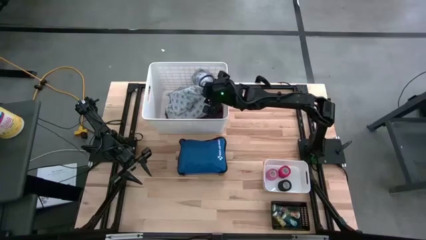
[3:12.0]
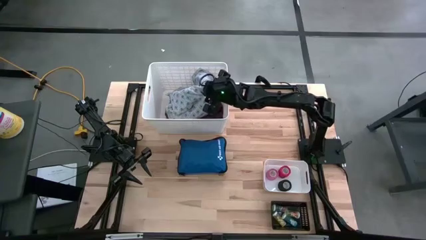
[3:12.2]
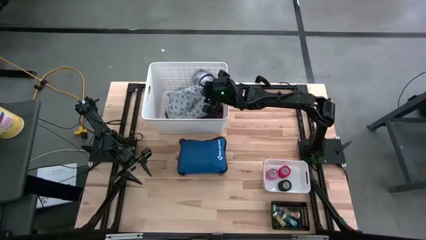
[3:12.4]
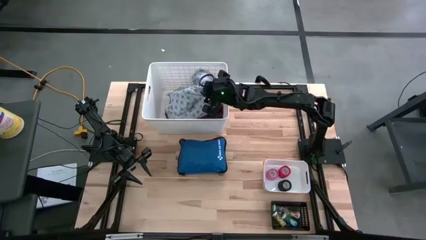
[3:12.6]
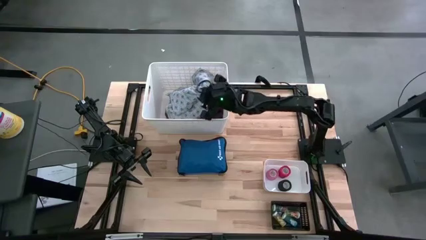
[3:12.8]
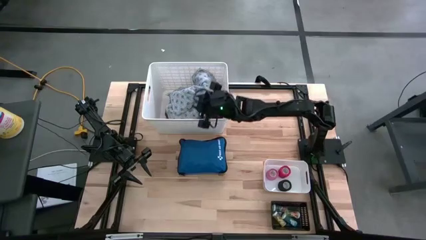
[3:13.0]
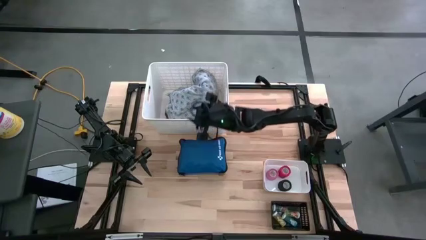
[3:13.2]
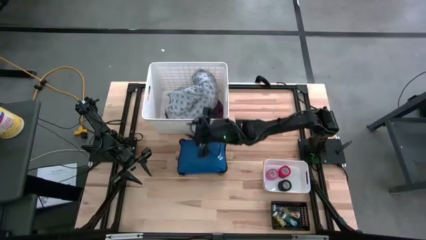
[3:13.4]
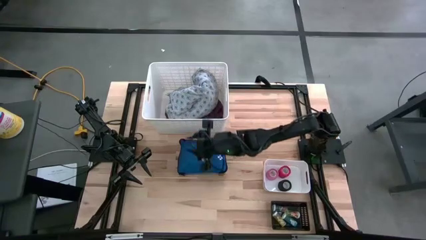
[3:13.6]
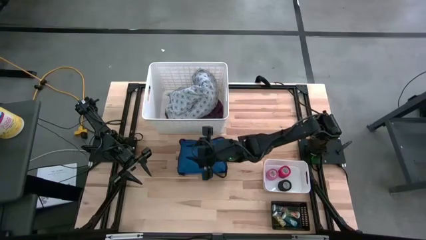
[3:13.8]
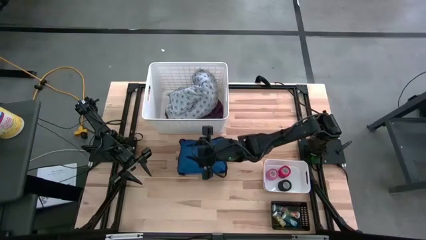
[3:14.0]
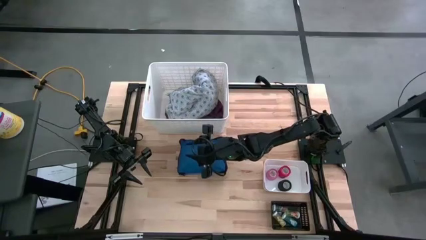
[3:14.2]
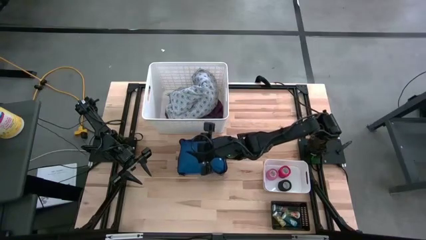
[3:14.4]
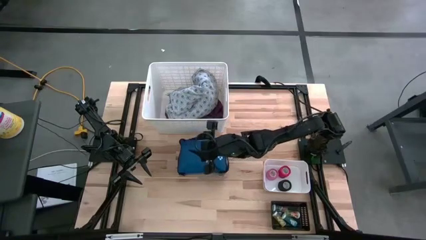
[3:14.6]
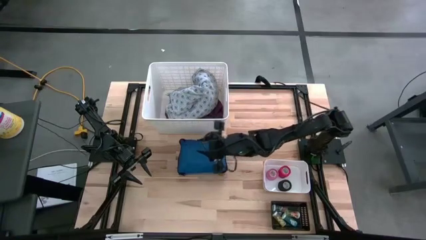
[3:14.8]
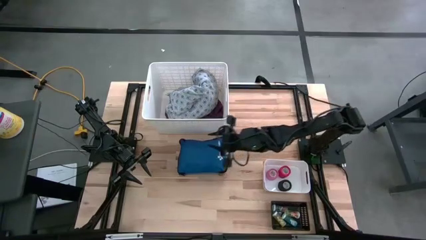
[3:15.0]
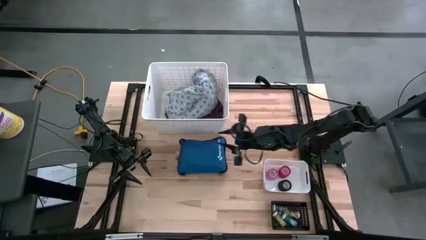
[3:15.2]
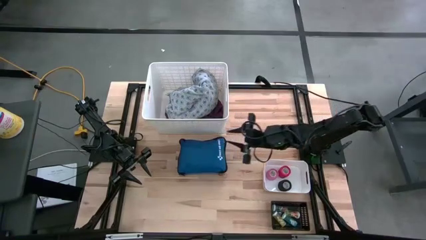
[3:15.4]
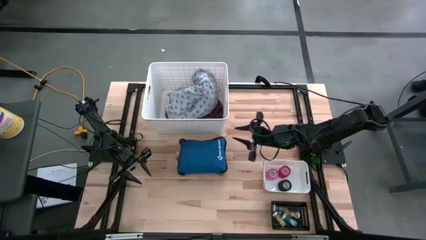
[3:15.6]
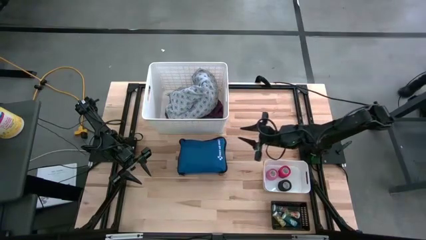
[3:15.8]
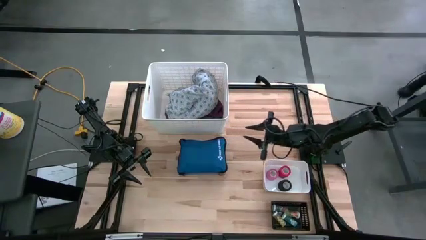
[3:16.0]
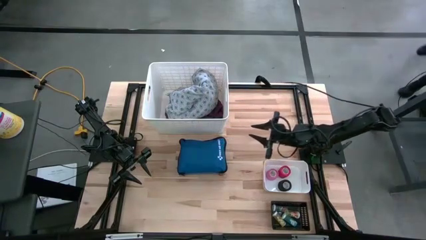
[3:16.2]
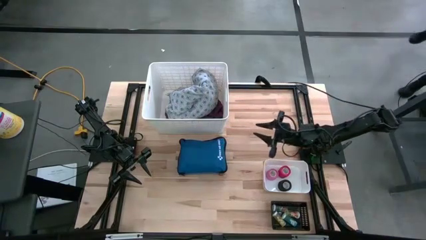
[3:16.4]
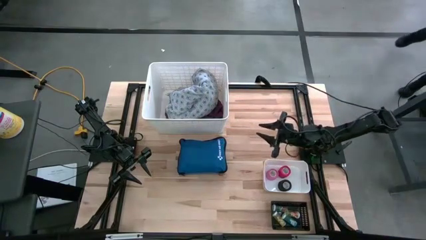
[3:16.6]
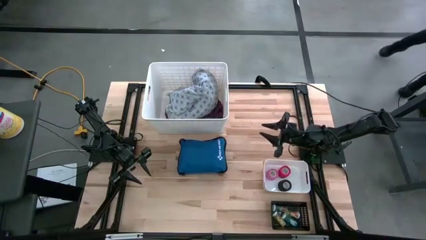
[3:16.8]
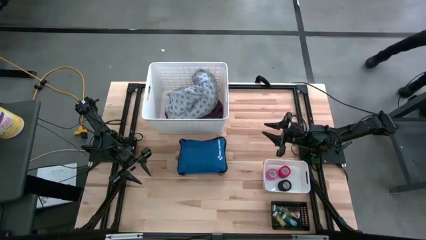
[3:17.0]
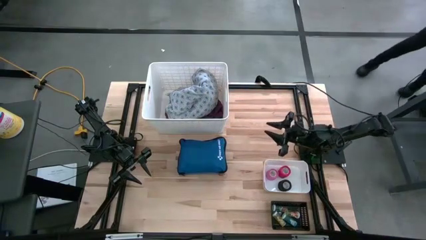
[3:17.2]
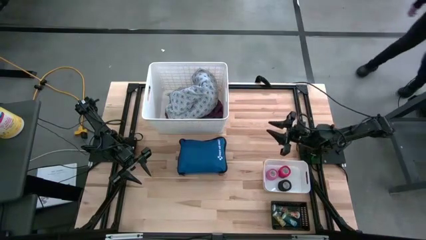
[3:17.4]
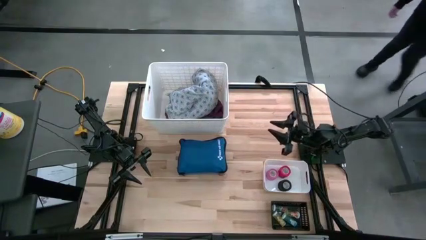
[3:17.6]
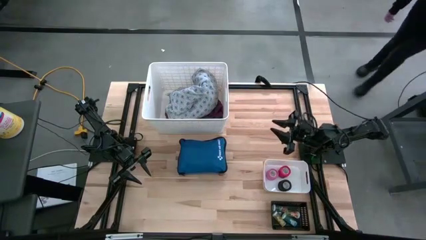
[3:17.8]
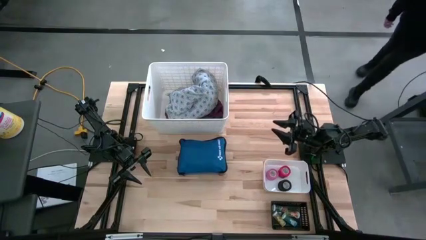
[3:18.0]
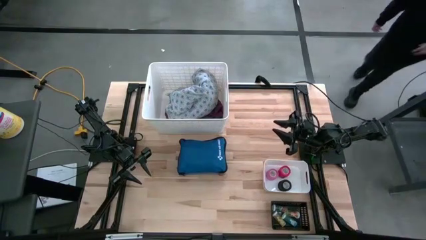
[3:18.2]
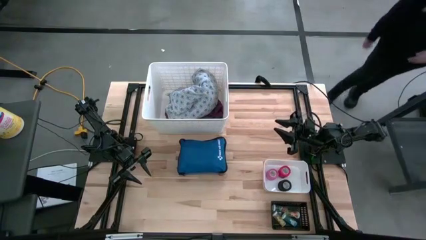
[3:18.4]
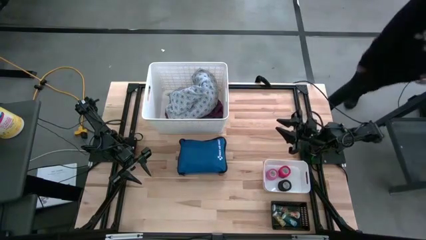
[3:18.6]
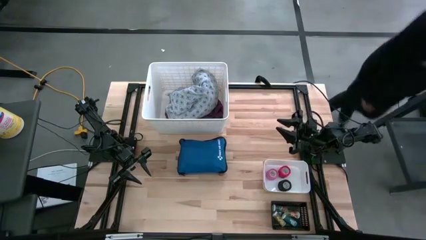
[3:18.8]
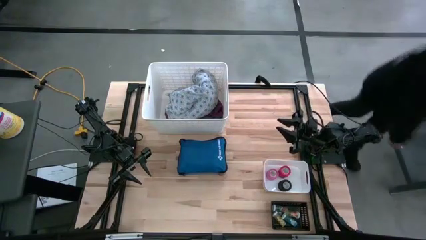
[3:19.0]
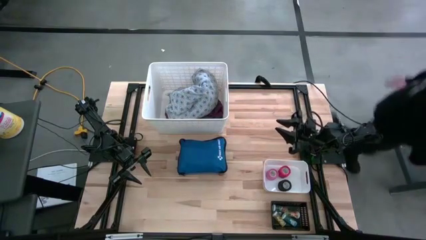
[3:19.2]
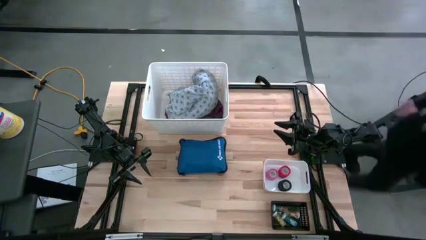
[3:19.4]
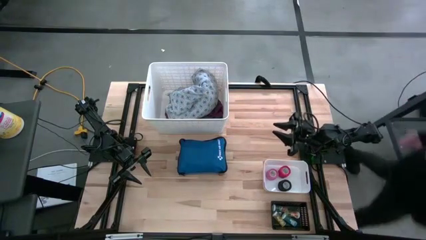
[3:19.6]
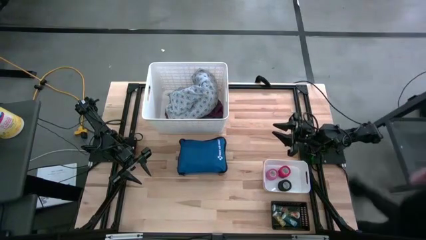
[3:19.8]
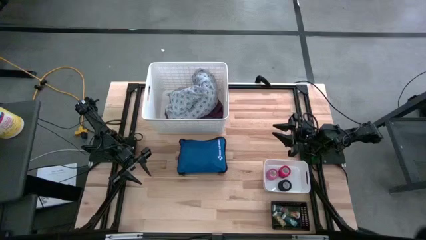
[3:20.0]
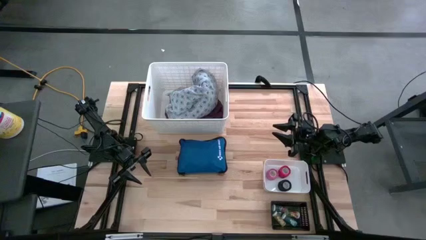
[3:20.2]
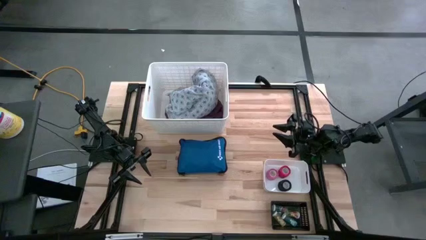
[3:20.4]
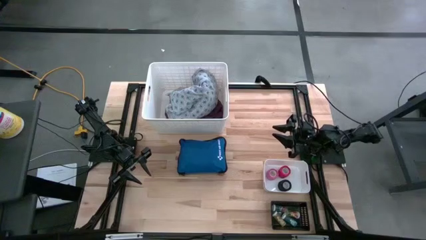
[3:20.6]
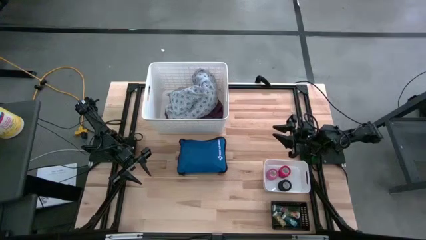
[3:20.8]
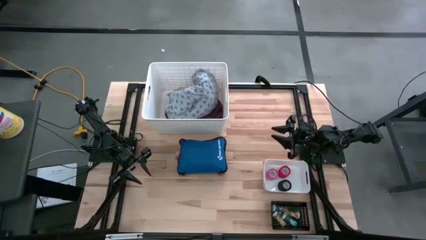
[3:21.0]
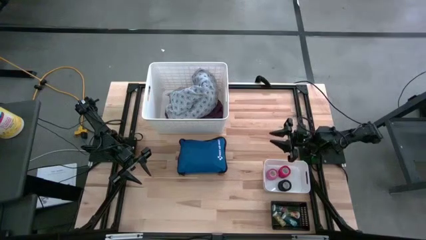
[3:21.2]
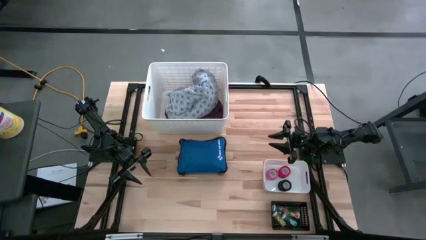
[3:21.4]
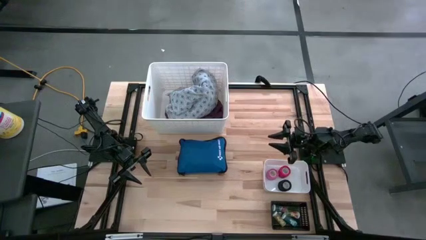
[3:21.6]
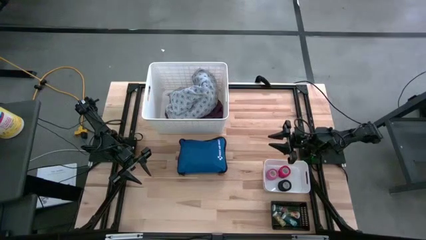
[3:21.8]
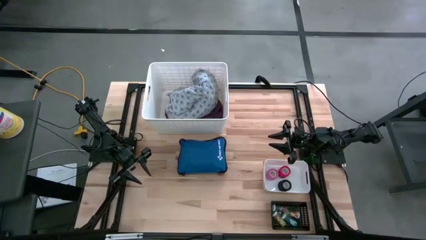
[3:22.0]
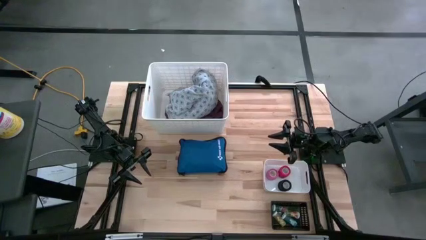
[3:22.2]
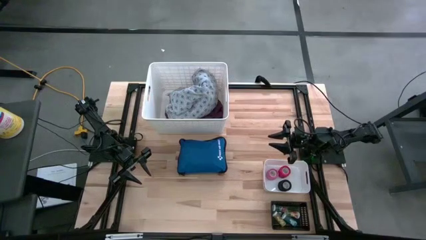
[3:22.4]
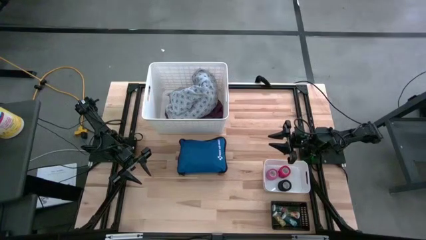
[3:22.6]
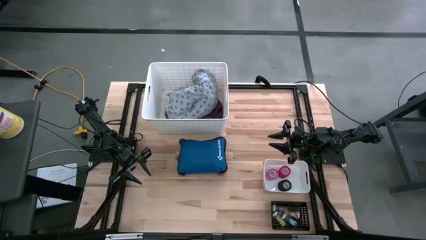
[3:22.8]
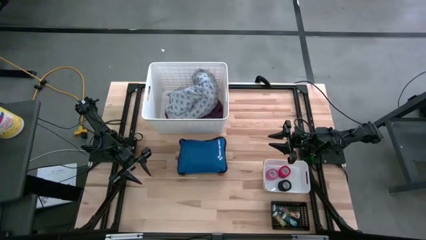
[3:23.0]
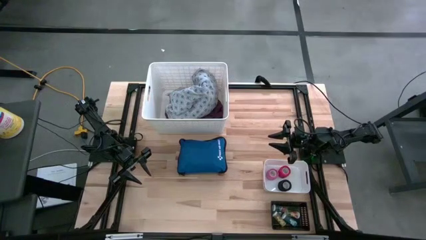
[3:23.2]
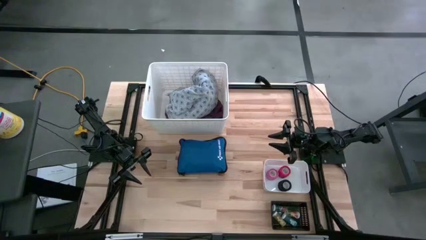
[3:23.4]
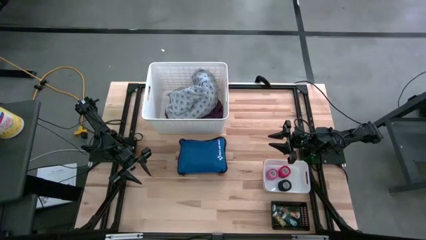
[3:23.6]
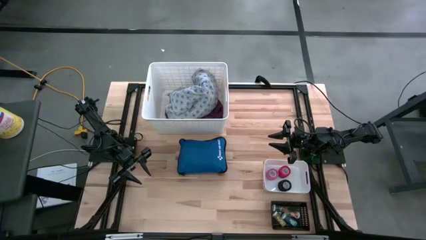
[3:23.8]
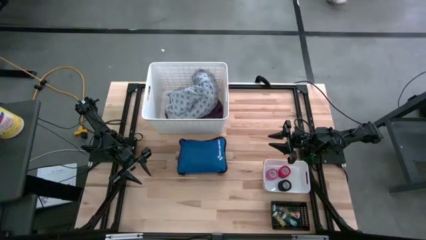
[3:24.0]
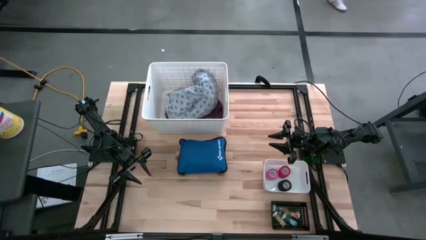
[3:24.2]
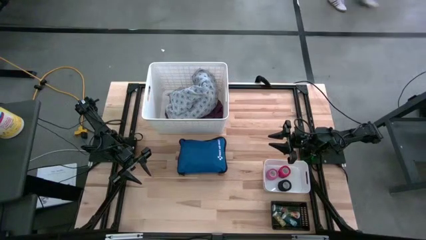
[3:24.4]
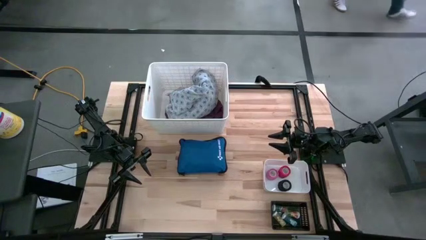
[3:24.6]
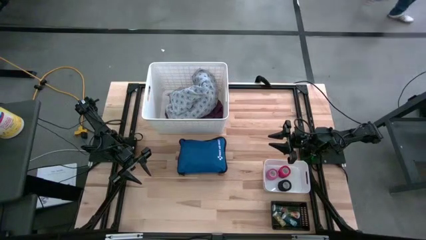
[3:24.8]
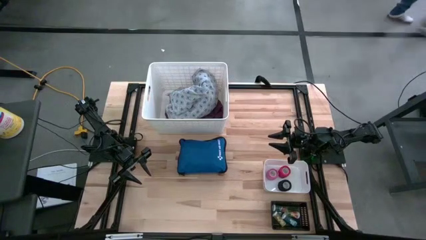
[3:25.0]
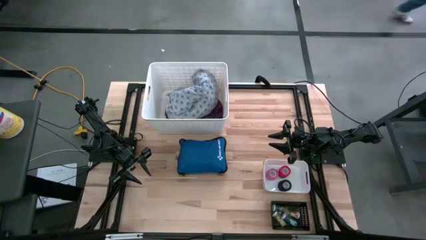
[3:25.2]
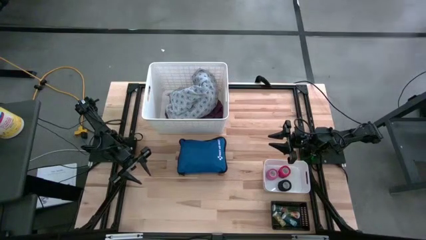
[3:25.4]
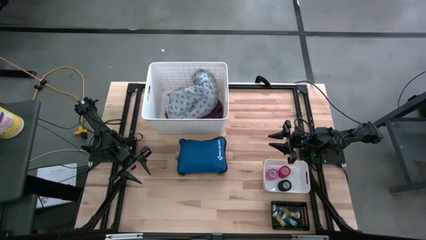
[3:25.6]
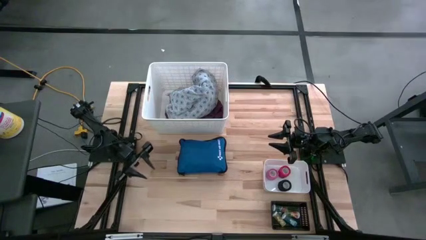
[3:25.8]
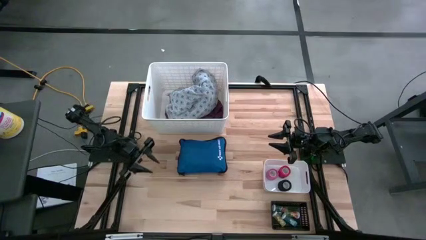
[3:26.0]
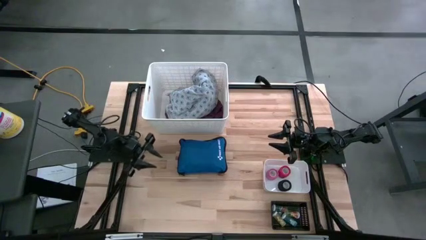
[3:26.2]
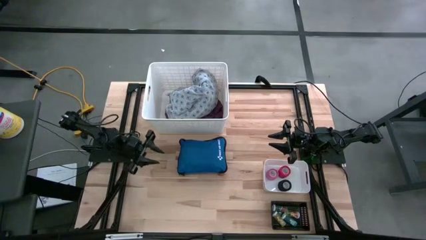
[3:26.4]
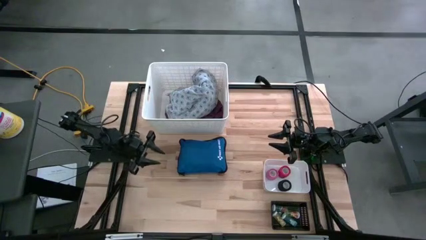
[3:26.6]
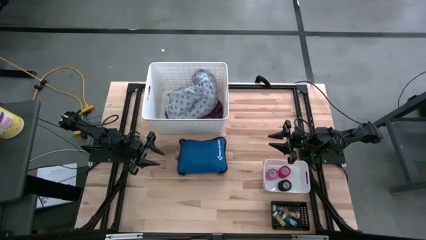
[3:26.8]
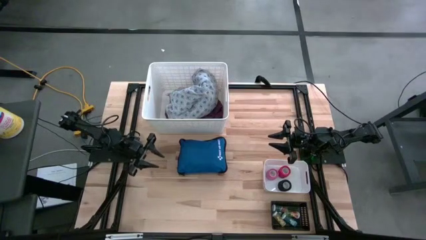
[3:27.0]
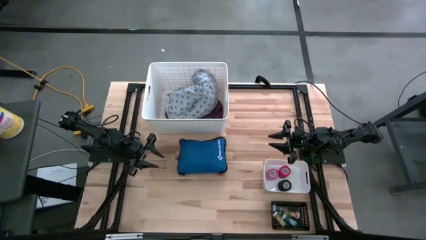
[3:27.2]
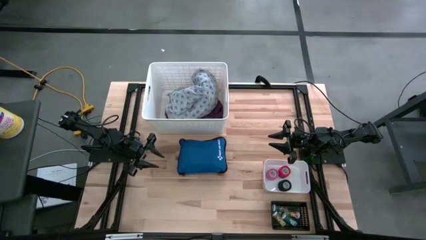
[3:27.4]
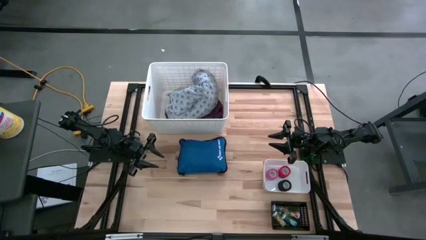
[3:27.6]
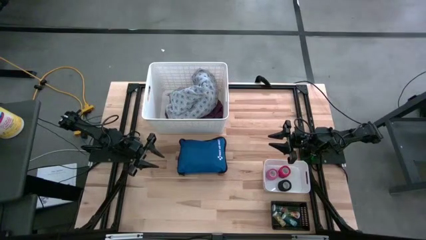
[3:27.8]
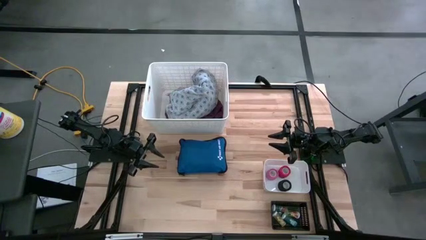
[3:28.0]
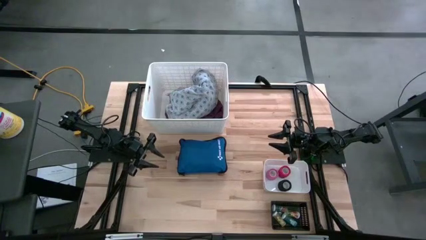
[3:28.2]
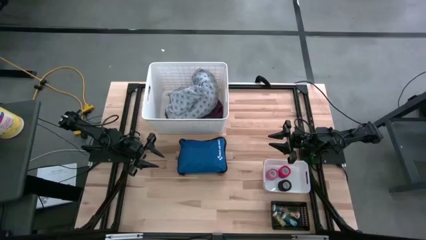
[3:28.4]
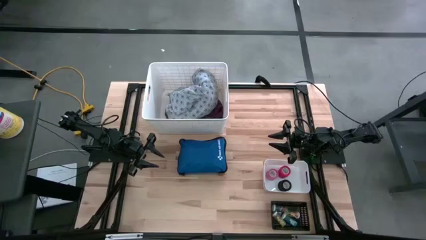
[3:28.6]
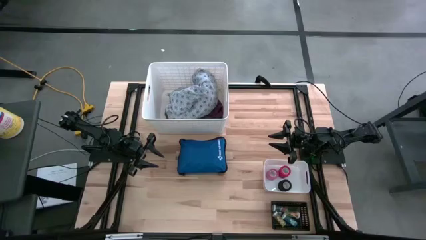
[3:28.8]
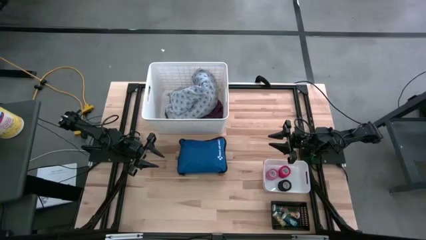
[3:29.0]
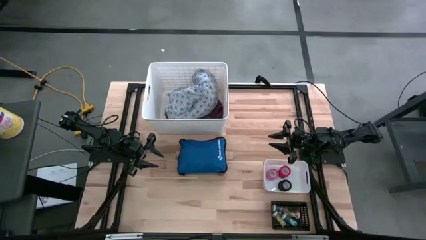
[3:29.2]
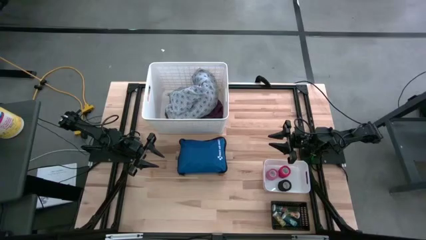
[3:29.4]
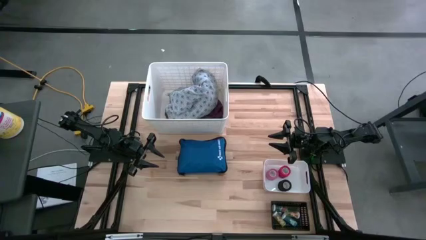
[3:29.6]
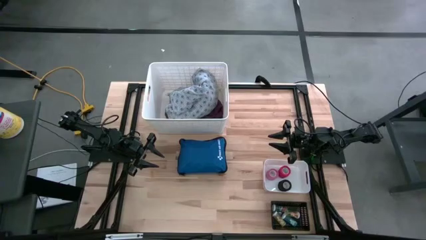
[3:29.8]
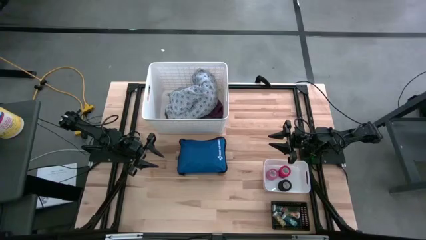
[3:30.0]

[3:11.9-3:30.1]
Task: Pick & Place Medicine items
Return to Home Position
